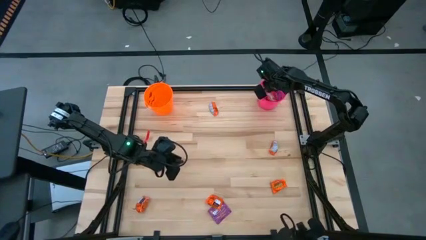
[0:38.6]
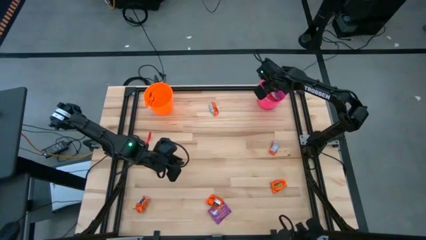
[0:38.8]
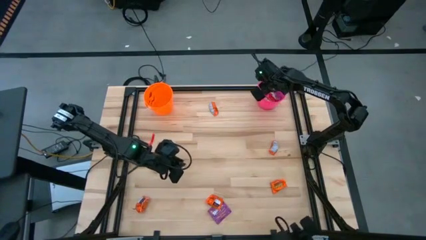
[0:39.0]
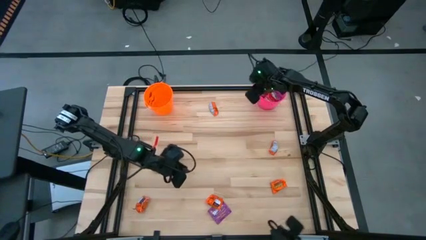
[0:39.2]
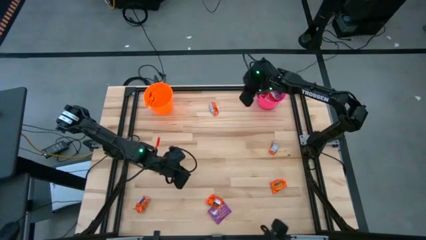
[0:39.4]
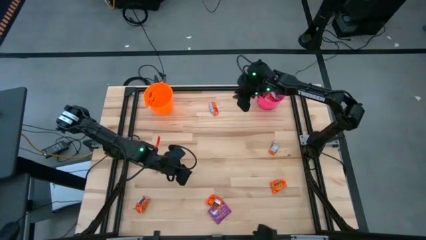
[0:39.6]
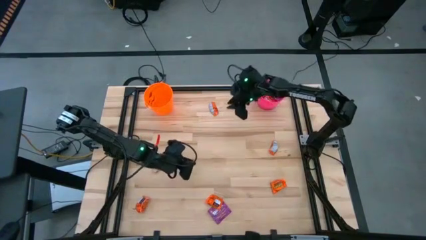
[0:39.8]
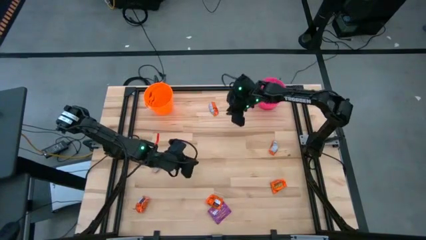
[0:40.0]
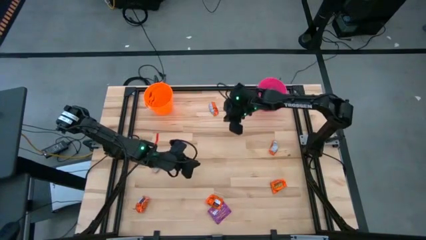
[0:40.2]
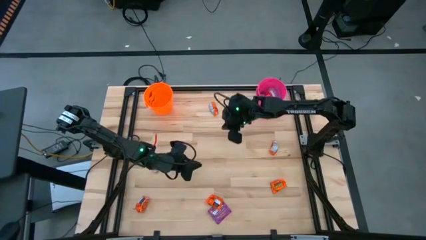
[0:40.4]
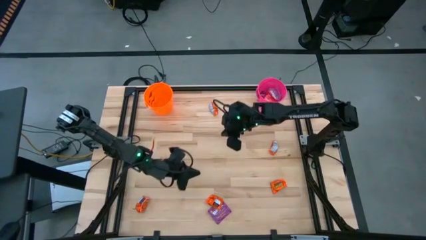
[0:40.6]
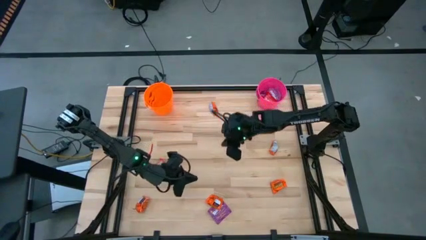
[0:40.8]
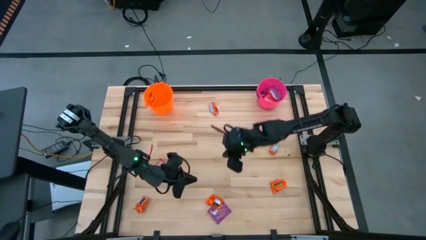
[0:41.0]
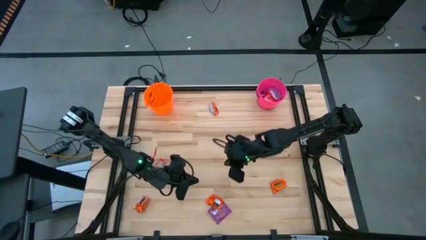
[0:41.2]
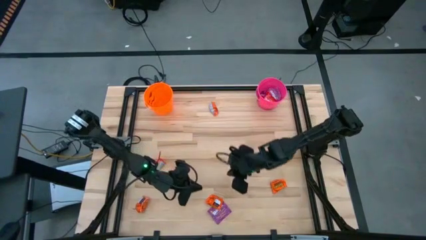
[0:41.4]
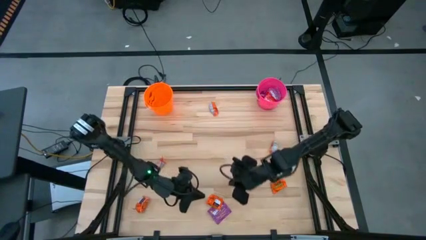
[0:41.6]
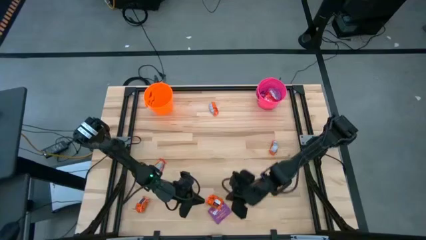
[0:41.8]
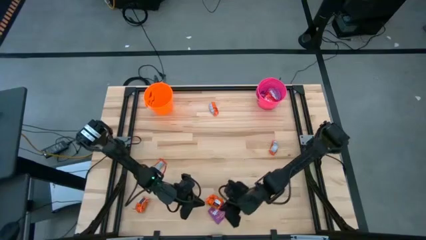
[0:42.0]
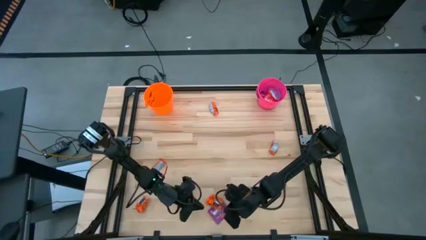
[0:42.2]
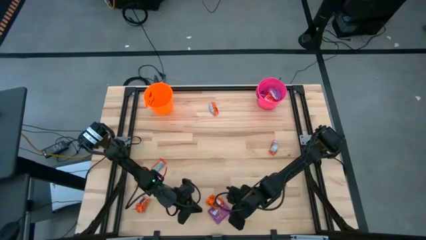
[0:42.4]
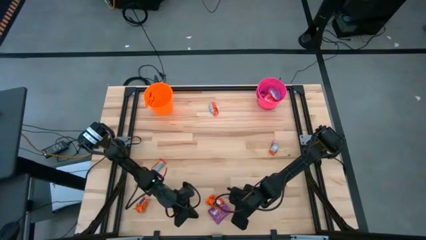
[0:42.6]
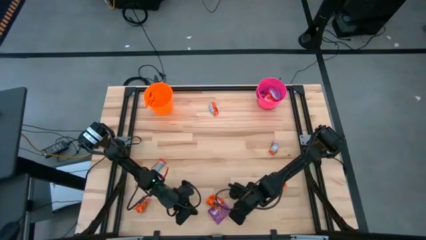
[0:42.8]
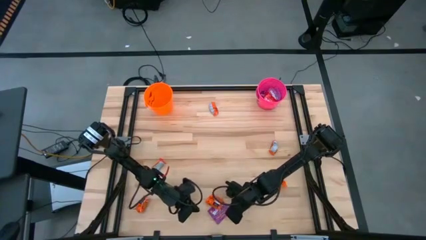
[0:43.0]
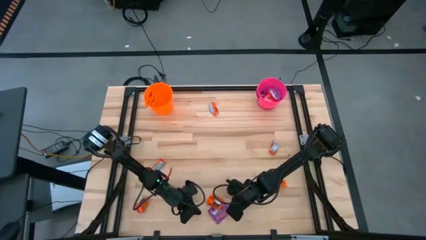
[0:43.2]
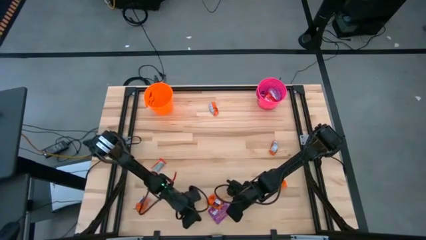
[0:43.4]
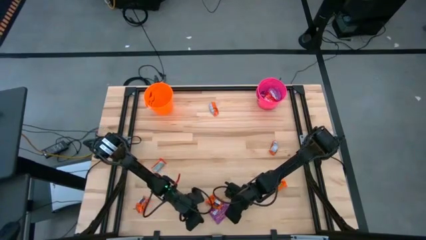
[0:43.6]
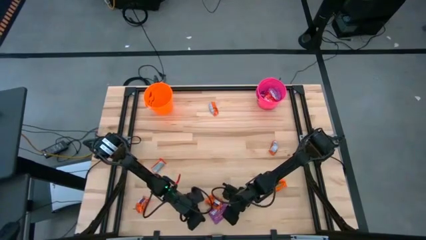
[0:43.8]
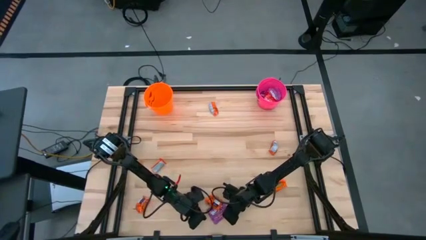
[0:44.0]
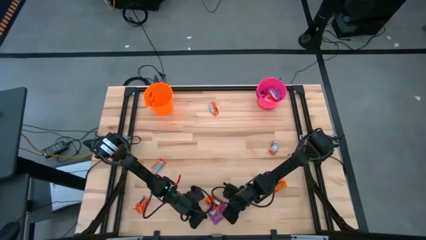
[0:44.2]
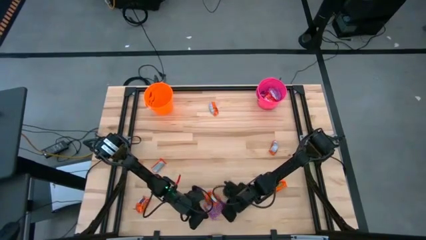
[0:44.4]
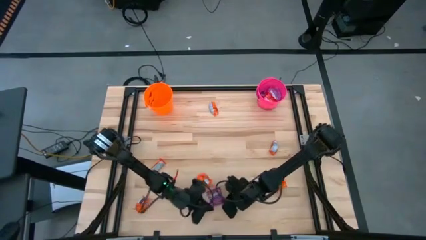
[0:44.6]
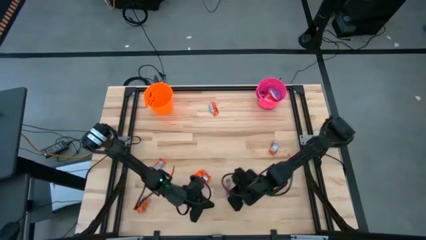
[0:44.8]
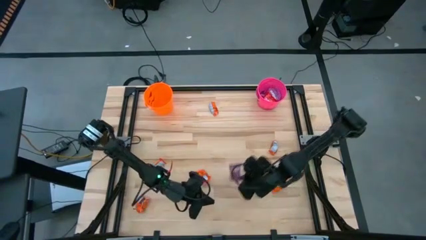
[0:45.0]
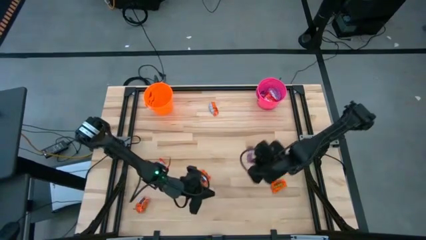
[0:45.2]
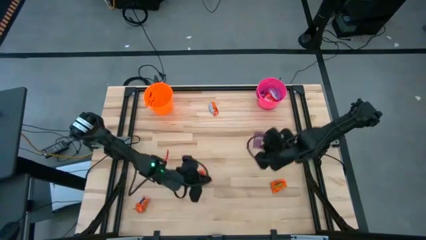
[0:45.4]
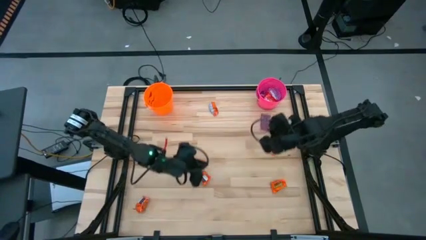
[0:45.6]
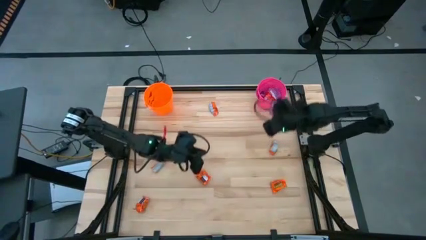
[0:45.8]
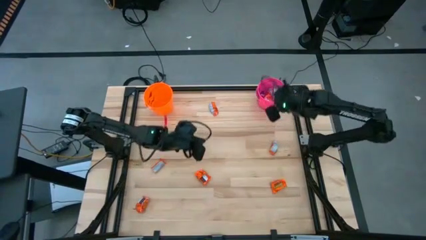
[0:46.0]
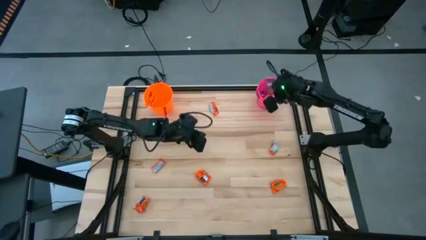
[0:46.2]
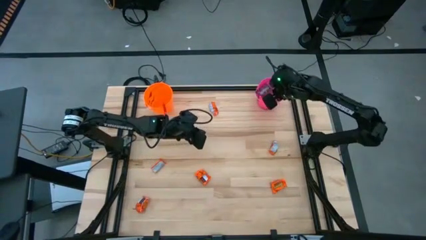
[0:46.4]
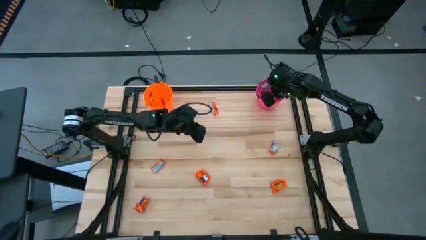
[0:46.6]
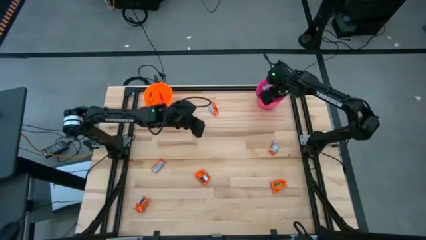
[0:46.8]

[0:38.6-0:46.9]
Task: Sort candy by brand, put in halloween buckets
Put the purple candy into the pink bucket

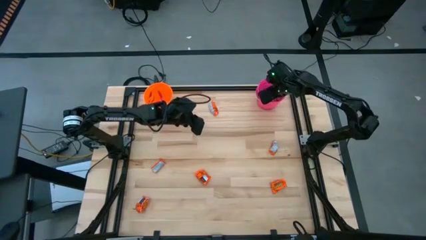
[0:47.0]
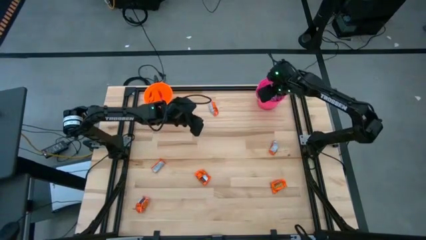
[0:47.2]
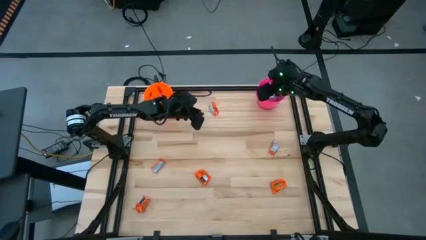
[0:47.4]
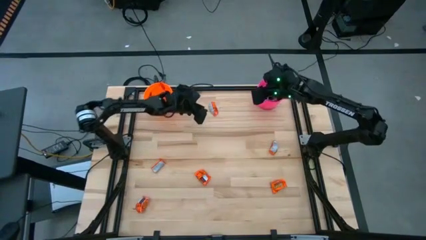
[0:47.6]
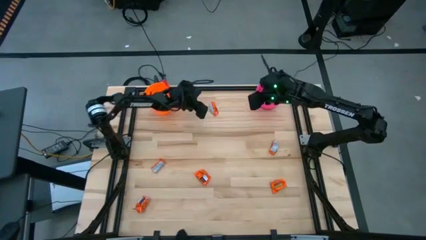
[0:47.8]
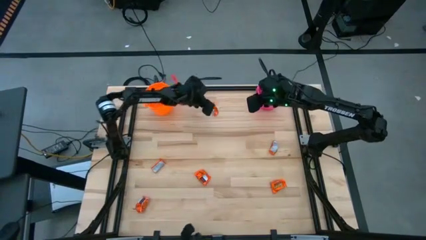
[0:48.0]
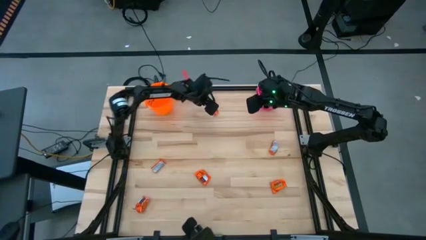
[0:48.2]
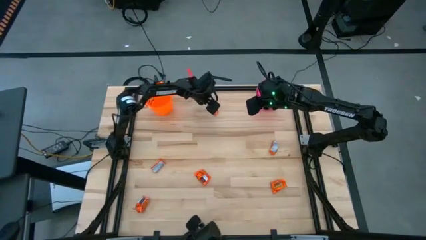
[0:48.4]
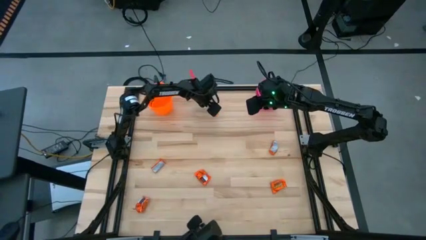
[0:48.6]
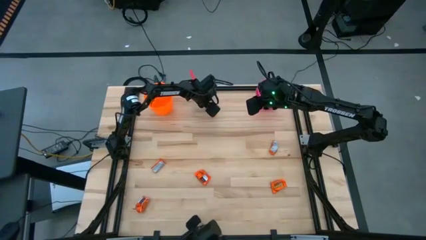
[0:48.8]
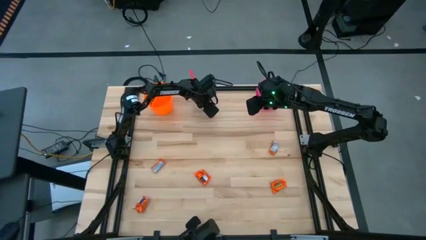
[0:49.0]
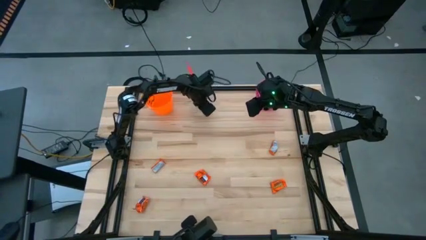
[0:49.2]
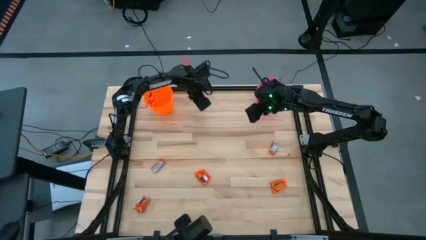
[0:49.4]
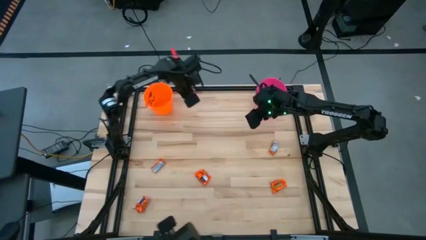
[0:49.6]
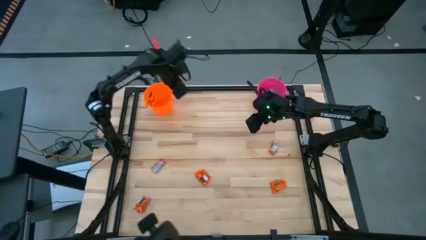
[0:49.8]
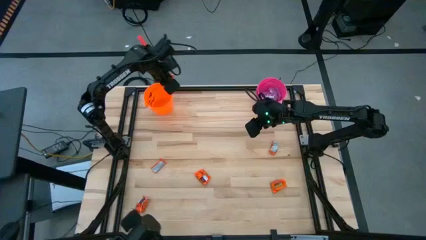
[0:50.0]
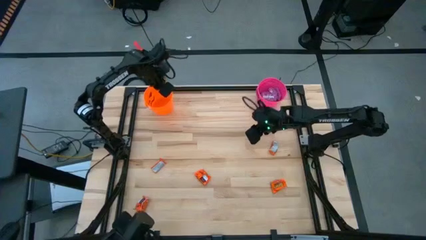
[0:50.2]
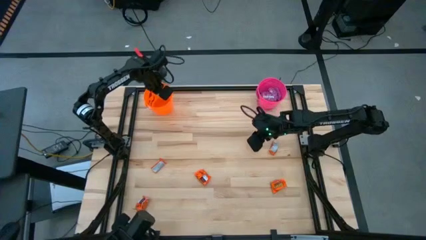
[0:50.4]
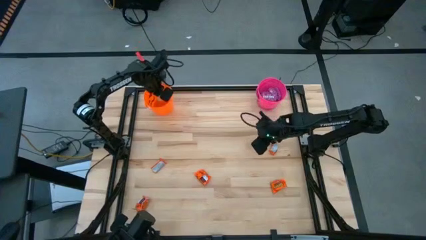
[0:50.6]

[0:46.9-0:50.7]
Put the orange chocolate bar into the orange bucket

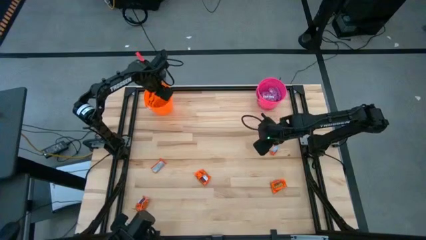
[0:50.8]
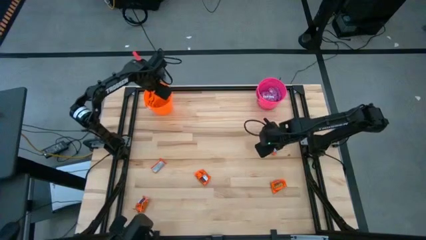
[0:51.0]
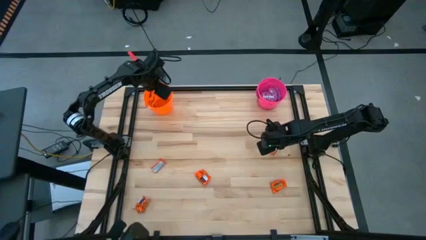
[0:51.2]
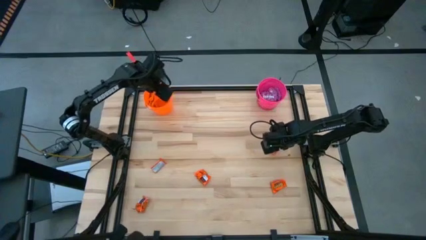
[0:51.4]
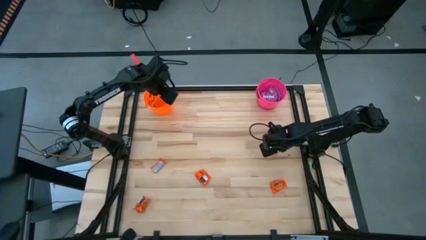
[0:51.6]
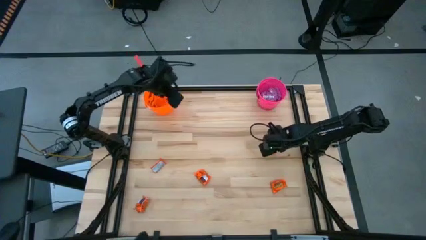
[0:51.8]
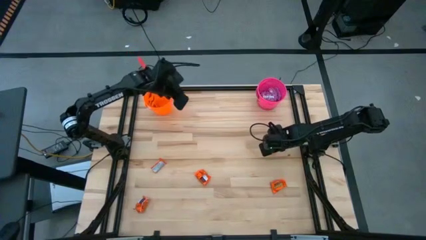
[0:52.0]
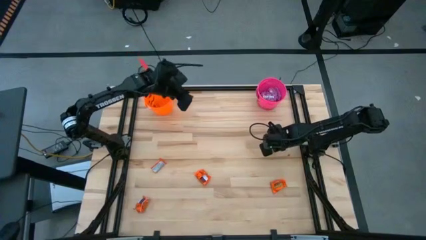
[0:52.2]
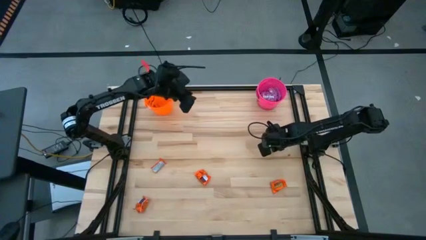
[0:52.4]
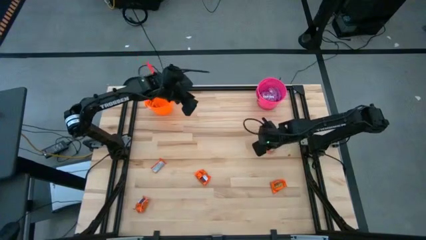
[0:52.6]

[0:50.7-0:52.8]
Put the orange chocolate bar into the orange bucket

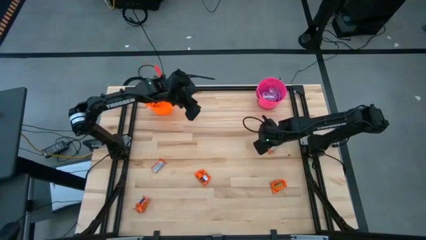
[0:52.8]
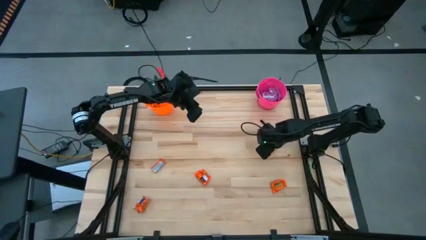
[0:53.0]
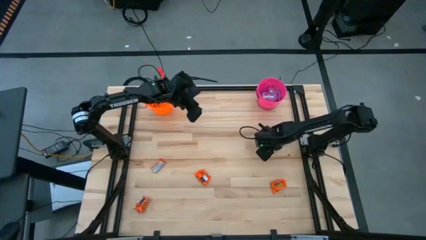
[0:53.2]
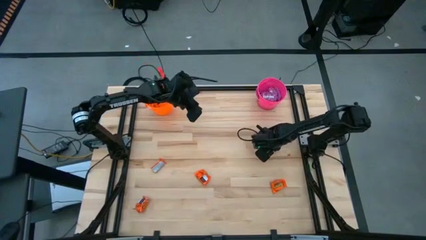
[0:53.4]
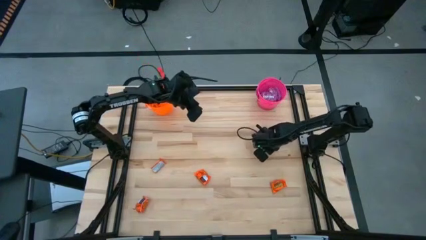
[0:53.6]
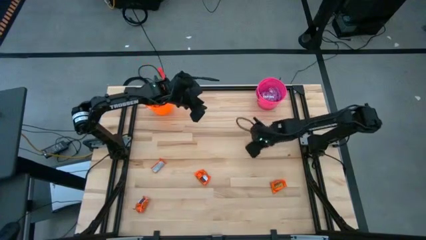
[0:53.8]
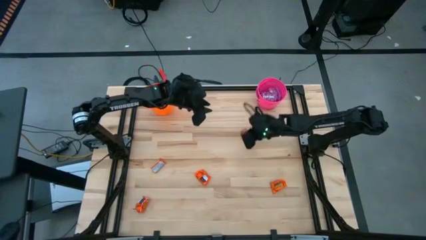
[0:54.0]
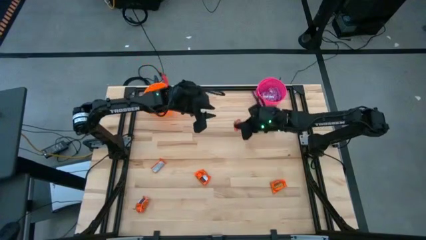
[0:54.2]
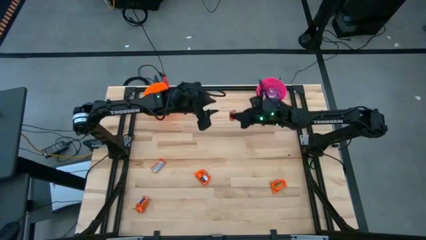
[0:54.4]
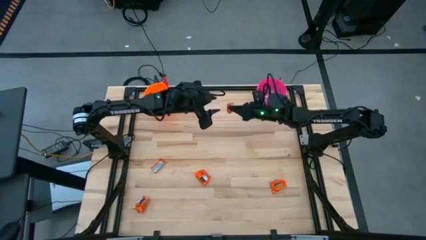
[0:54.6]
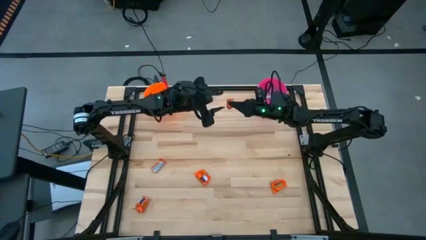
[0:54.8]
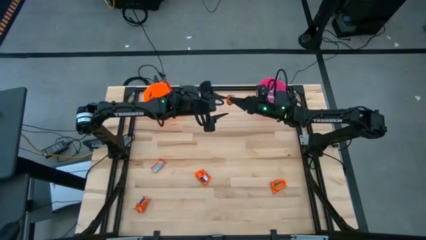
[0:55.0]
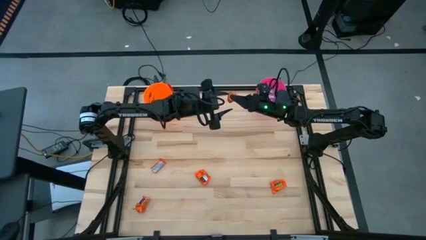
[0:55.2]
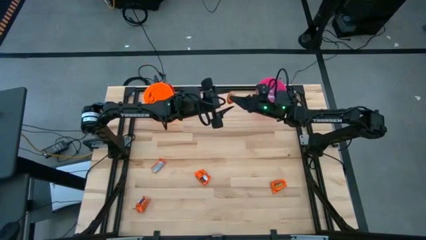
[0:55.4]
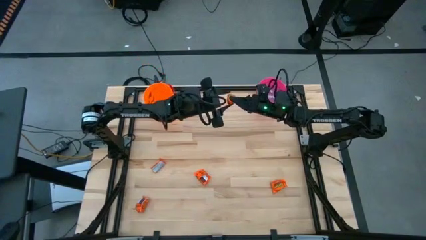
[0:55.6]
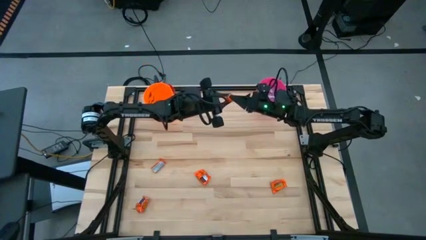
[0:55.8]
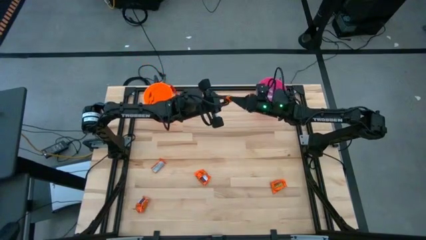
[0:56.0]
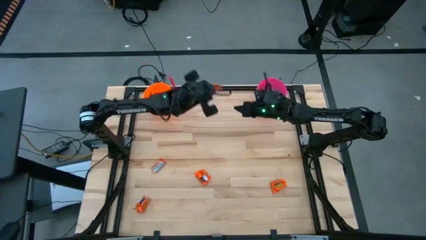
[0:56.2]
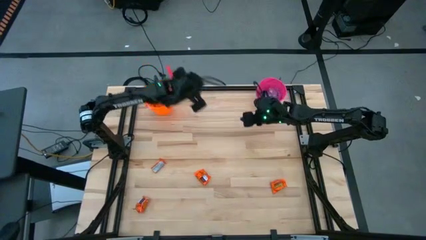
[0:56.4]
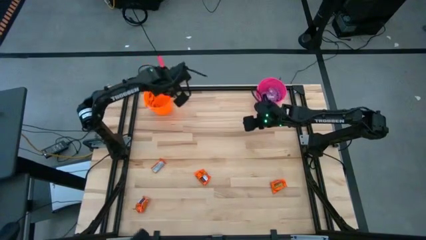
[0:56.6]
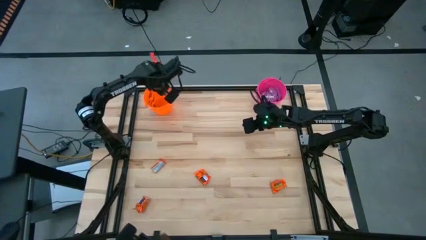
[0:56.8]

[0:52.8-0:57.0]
Put the orange chocolate bar into the orange bucket
